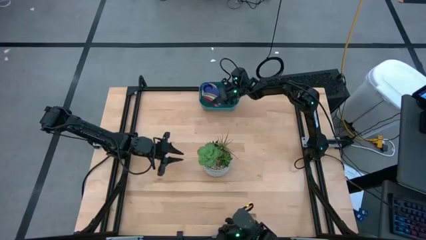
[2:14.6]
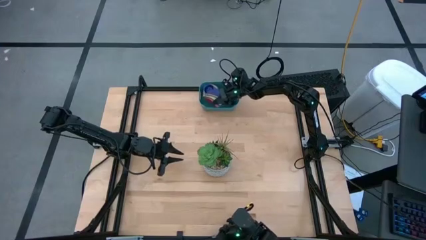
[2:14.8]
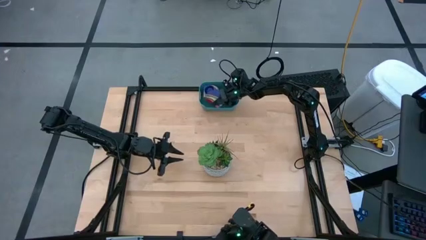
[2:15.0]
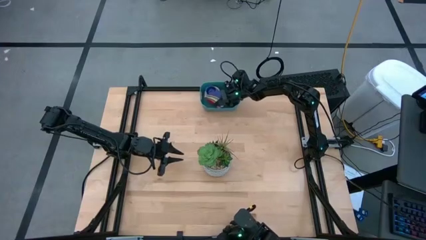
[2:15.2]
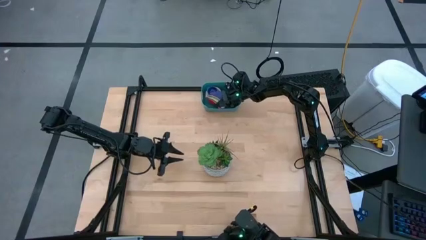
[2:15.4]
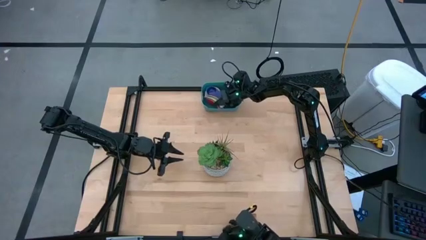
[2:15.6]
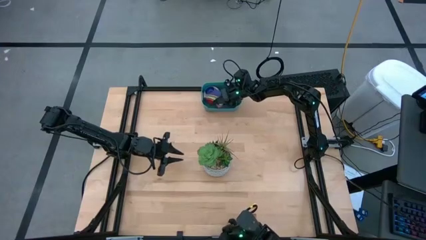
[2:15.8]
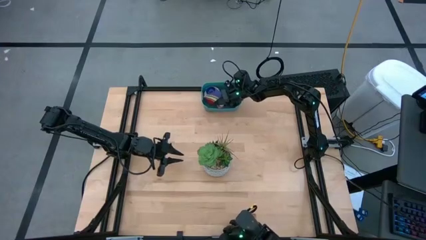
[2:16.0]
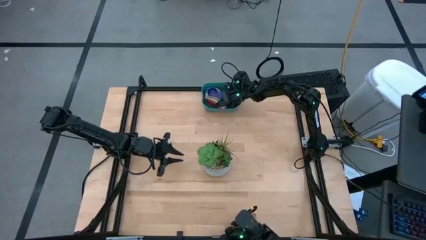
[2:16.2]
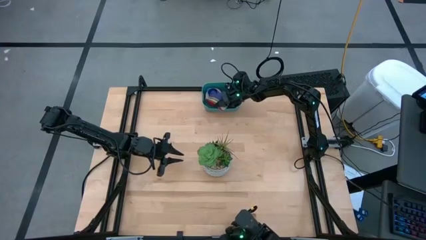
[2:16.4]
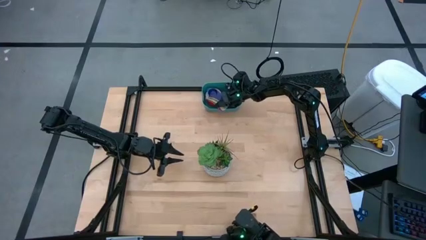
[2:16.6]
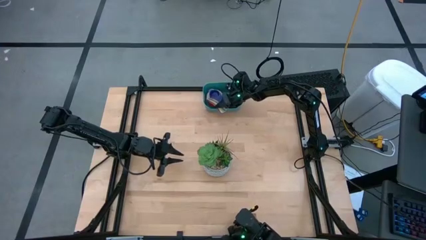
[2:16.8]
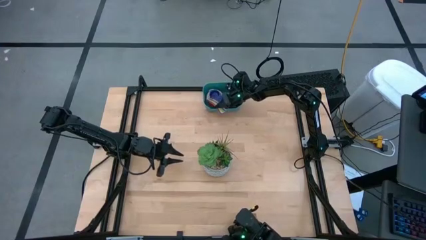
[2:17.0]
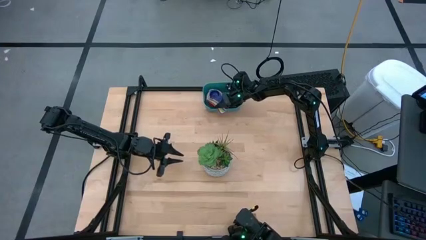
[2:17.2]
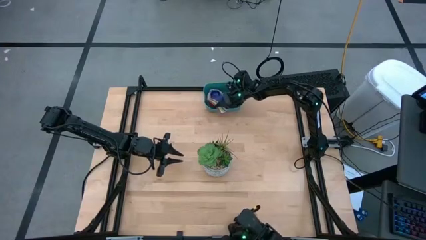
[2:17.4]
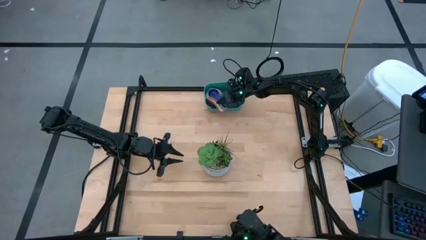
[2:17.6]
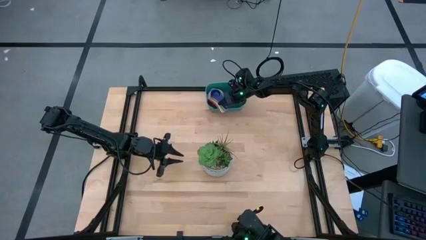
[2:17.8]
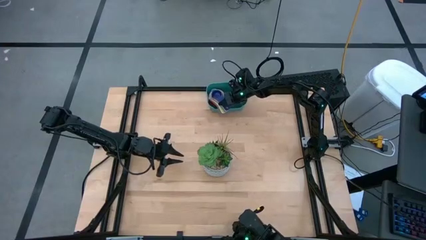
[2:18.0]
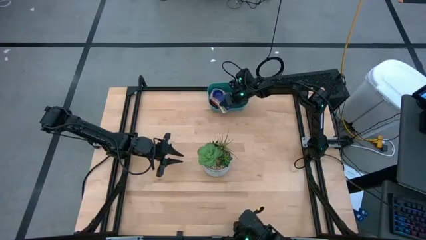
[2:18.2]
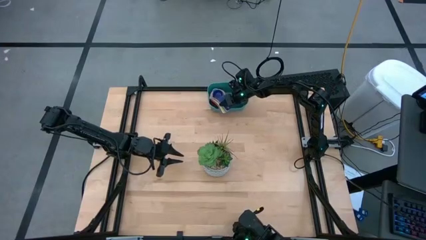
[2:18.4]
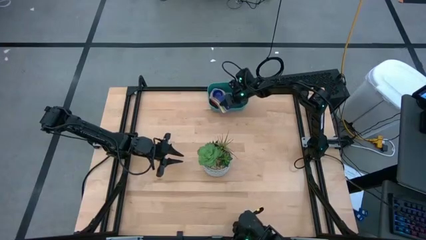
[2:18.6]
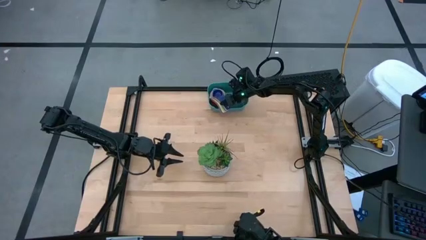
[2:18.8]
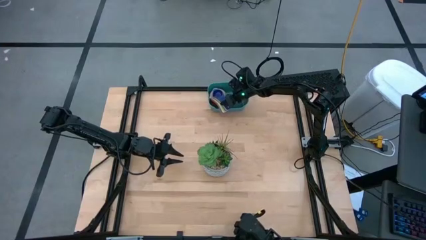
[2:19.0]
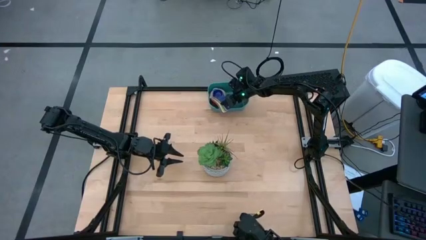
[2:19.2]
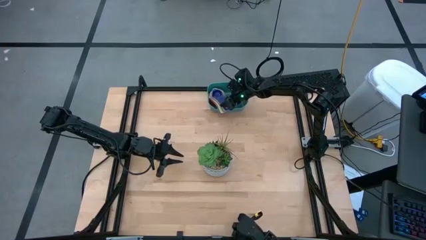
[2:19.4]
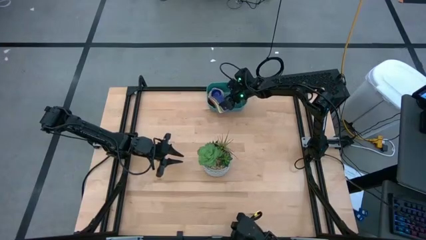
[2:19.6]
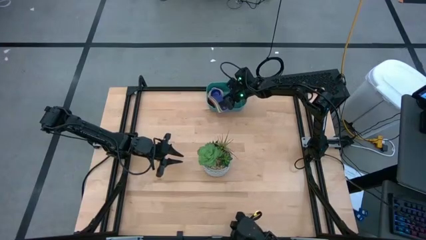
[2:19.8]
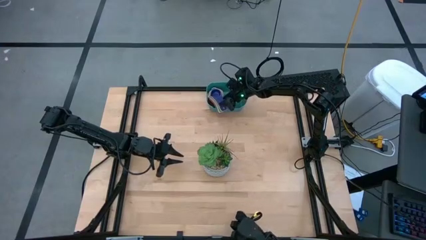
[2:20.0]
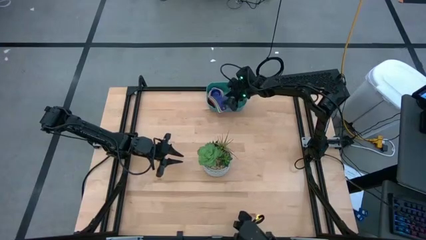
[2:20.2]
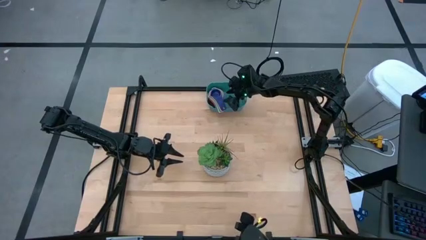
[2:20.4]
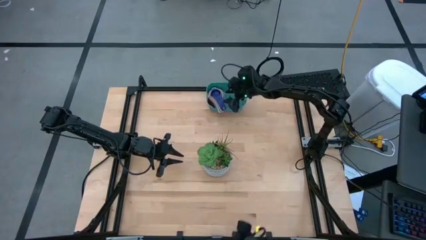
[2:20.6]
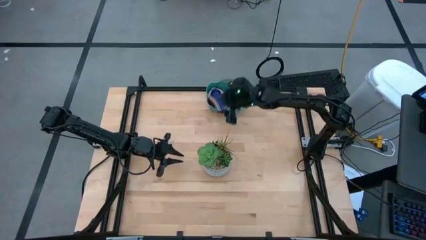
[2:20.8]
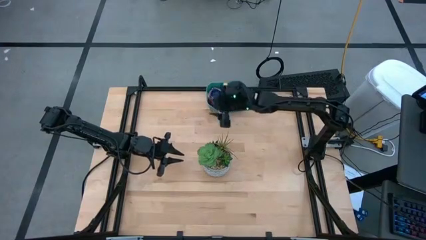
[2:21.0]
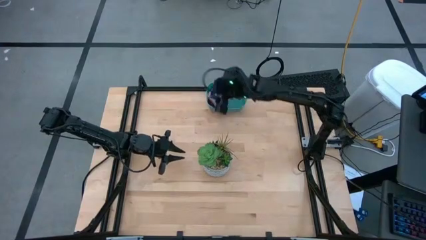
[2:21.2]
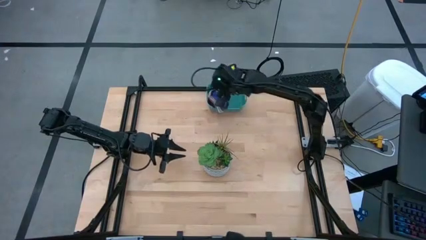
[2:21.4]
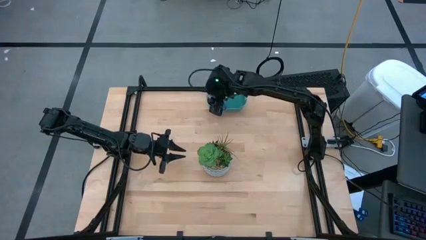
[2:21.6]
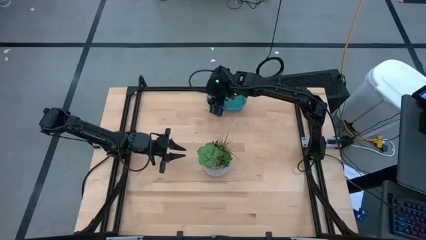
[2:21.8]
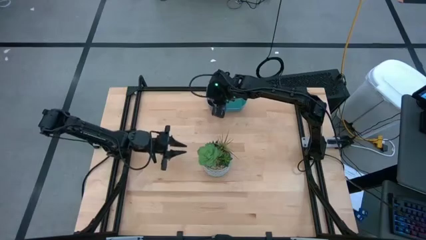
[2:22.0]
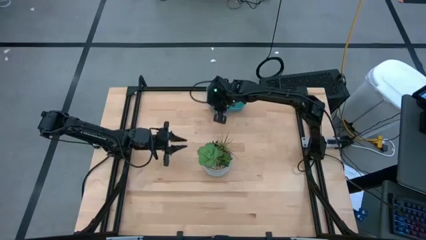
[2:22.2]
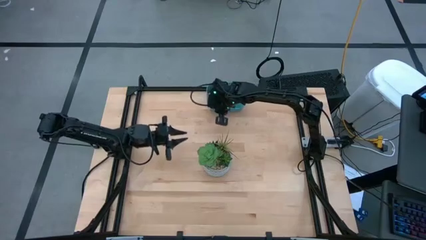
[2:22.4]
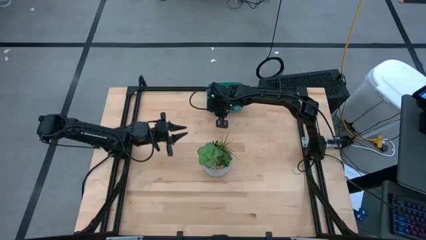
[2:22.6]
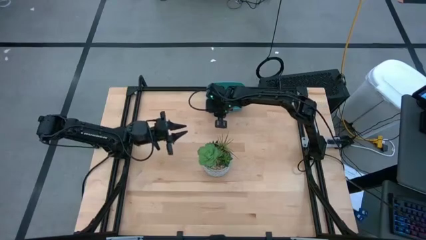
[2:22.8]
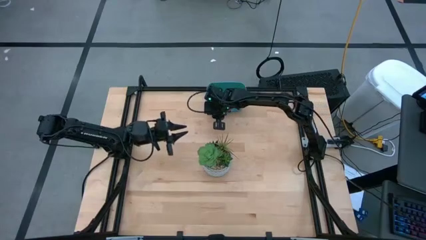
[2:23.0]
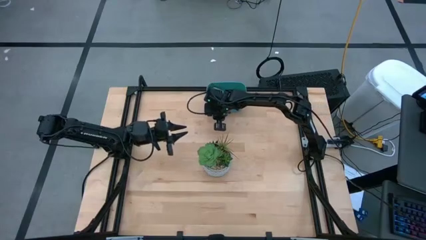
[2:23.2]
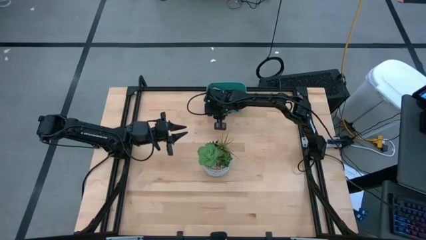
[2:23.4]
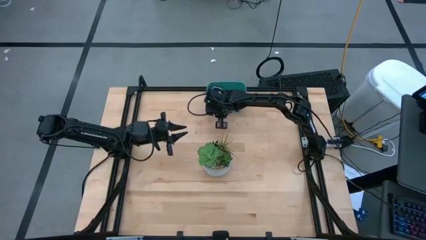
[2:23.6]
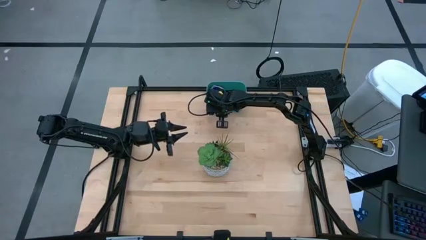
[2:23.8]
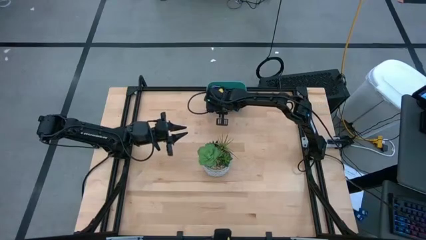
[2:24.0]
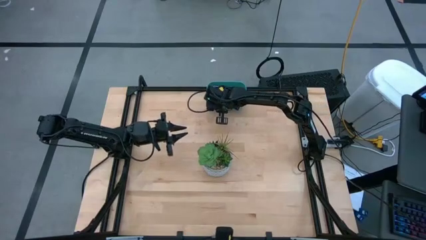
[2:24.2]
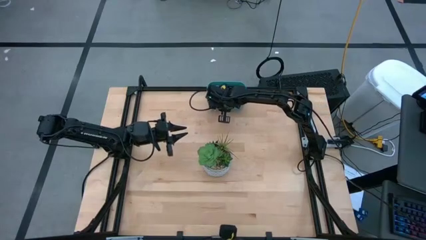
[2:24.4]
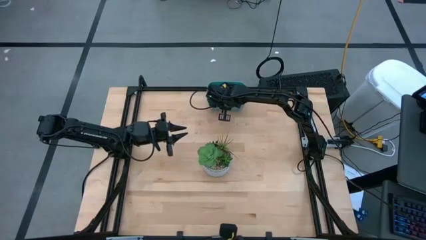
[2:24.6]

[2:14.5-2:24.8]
Task: Nest measuring cups in basket
Put the nested measuring cup into the green bin

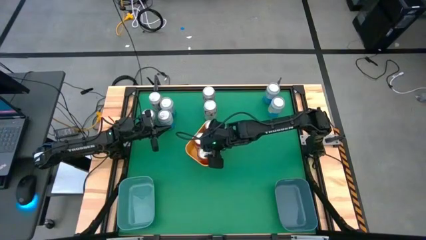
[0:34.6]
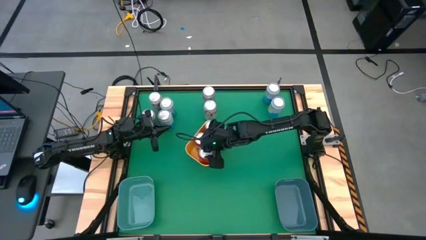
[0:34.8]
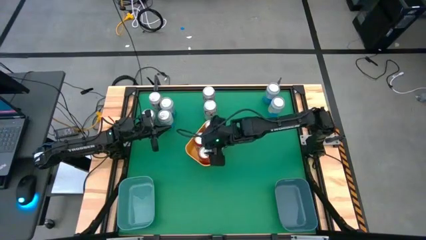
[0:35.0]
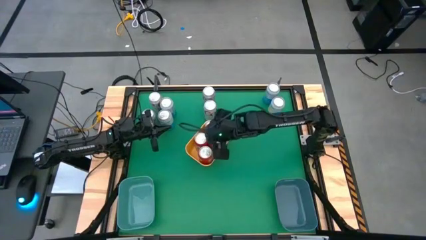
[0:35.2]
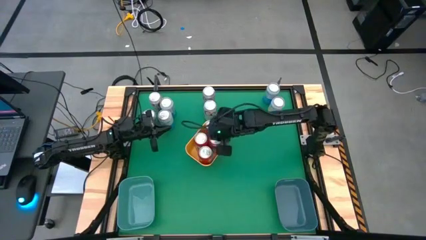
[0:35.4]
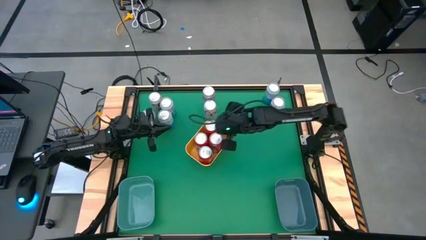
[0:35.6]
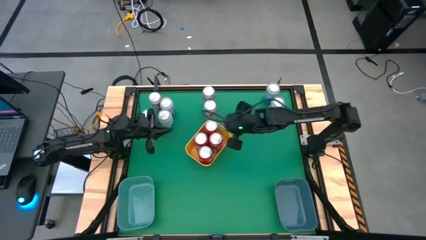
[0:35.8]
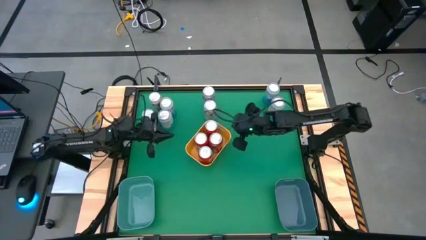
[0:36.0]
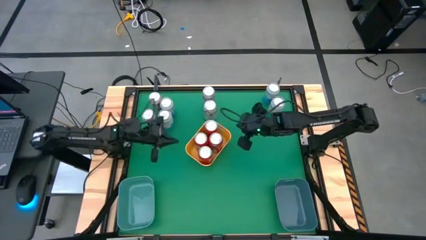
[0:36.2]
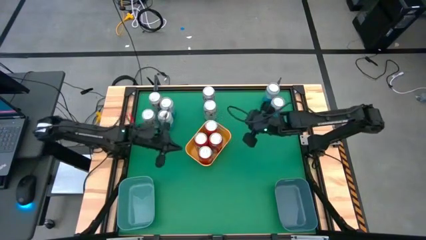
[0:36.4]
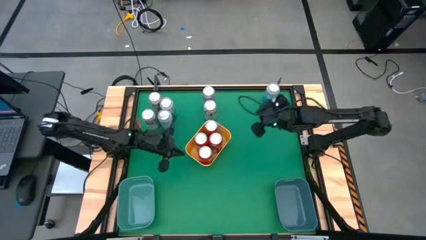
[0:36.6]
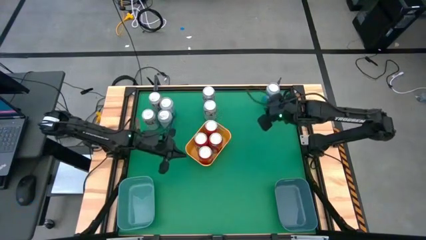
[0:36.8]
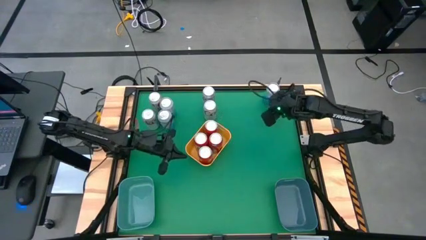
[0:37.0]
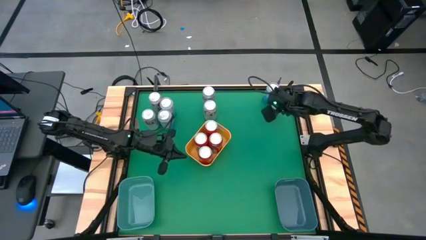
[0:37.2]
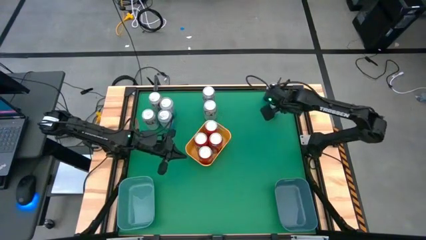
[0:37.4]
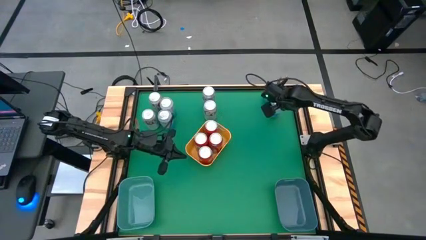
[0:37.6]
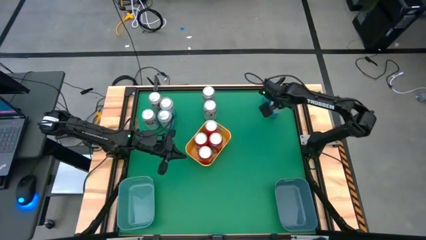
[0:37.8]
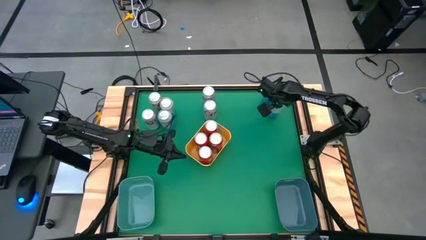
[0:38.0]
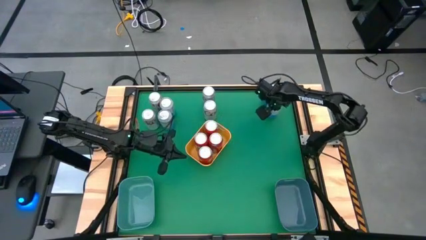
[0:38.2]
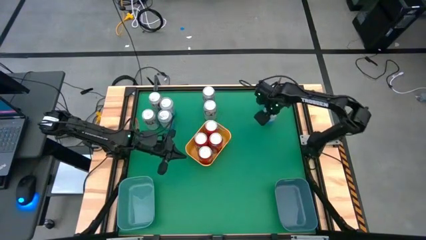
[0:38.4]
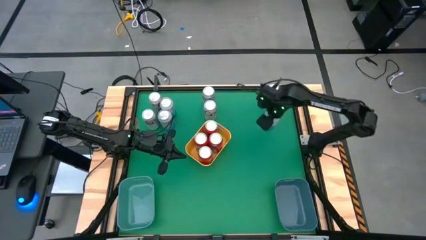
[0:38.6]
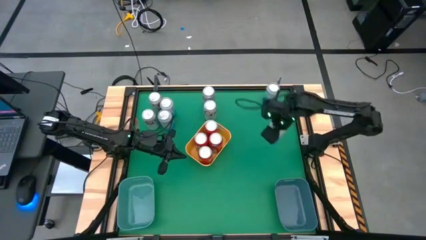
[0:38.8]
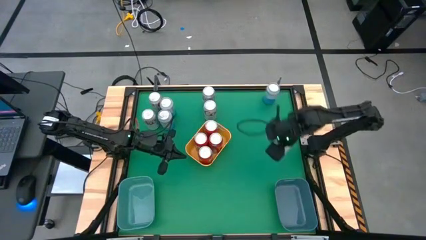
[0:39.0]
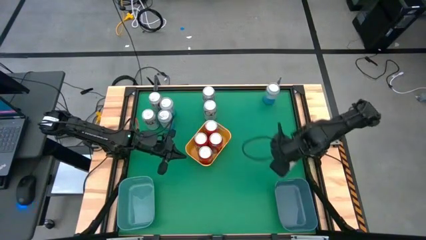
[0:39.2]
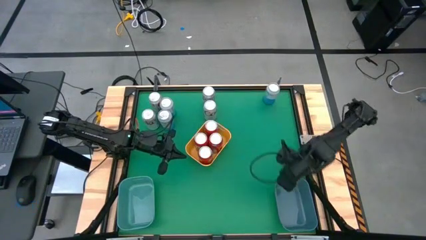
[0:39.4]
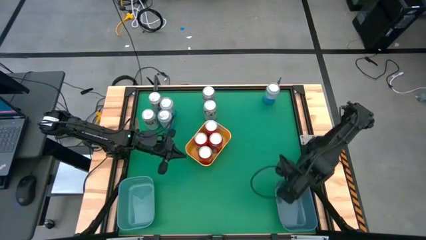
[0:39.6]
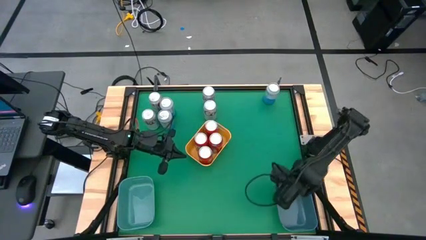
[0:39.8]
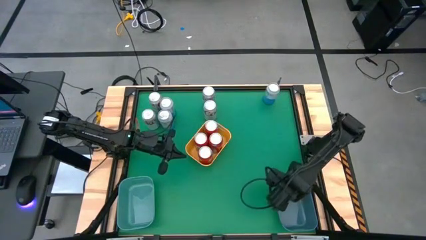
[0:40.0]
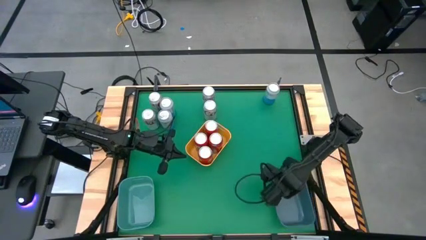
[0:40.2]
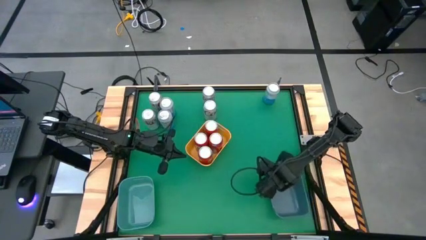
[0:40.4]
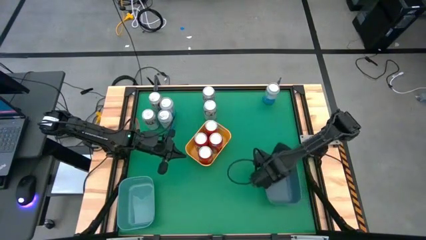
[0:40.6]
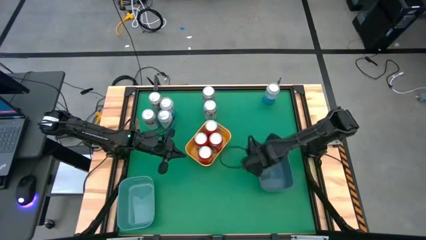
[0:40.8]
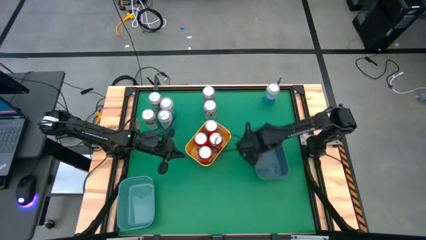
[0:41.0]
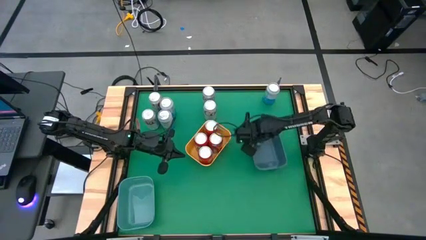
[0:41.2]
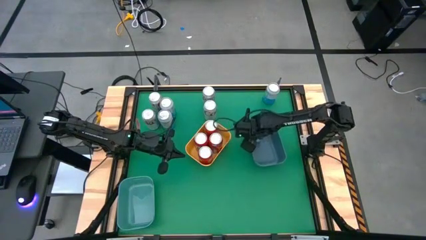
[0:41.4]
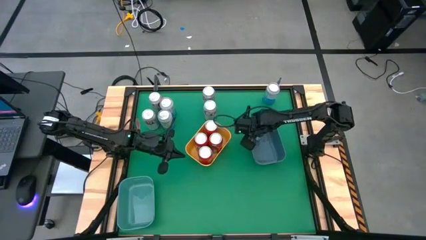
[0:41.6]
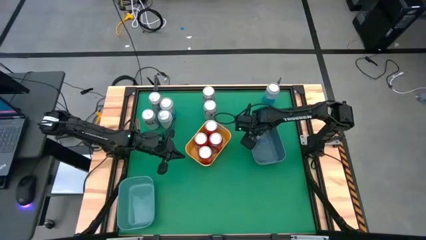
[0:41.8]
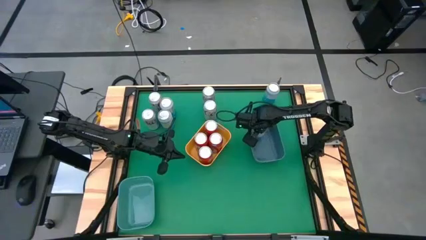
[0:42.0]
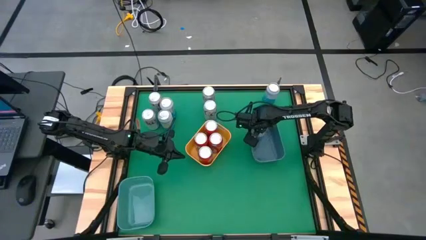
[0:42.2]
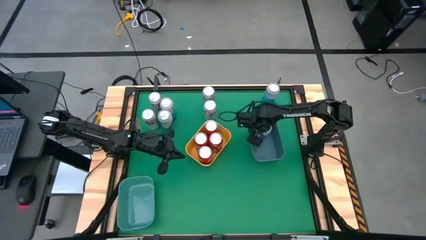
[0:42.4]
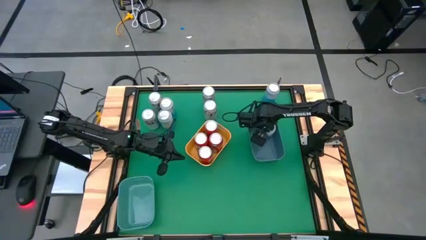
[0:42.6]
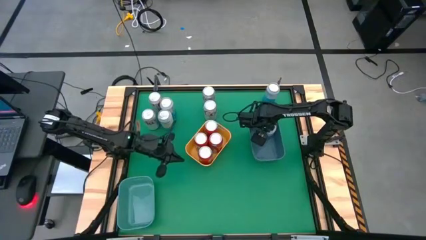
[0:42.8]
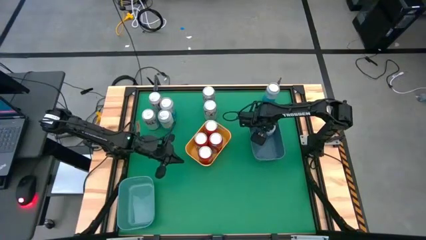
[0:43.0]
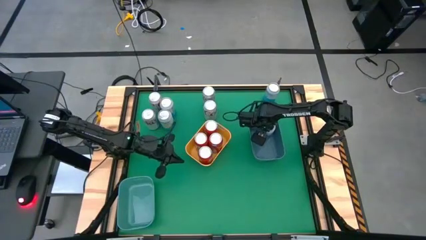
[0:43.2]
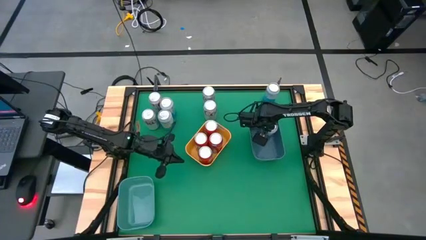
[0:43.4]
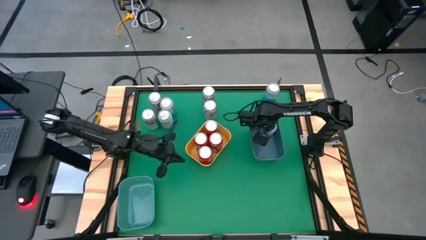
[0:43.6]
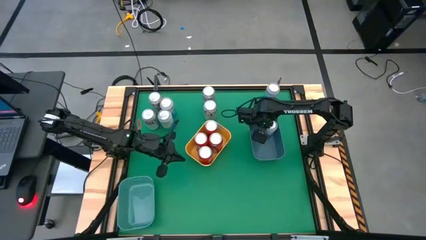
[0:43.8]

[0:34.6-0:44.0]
Task: Sort soda cans
Put the bottom right blue and white soda can into the blue bin
